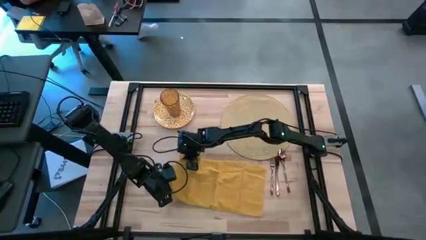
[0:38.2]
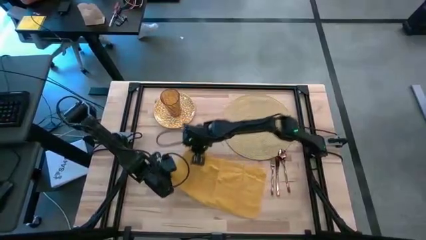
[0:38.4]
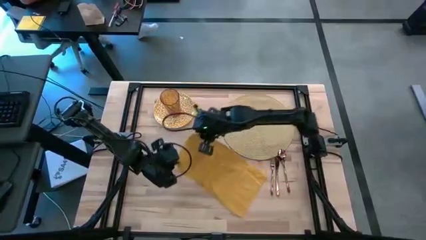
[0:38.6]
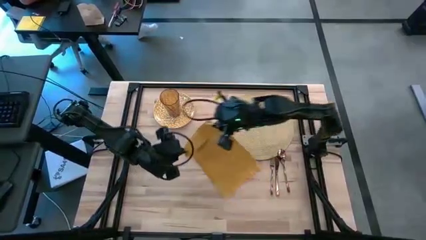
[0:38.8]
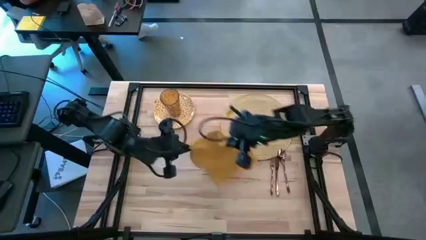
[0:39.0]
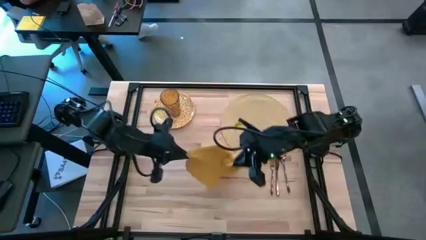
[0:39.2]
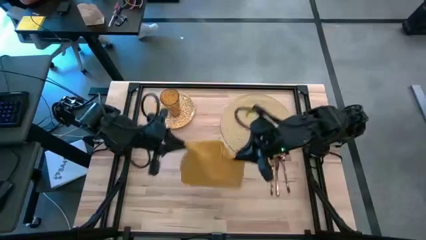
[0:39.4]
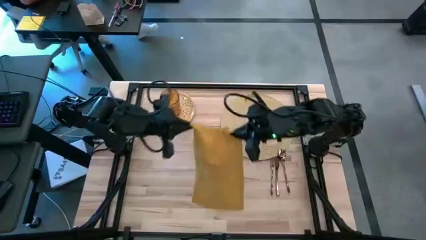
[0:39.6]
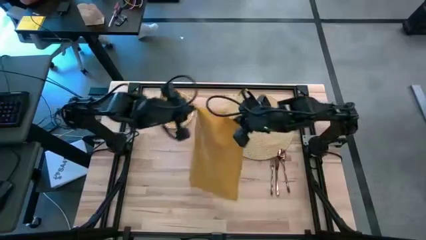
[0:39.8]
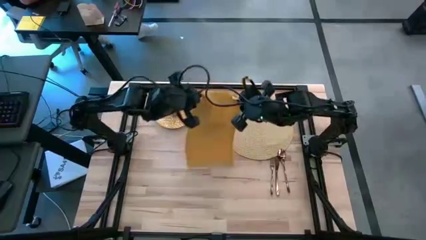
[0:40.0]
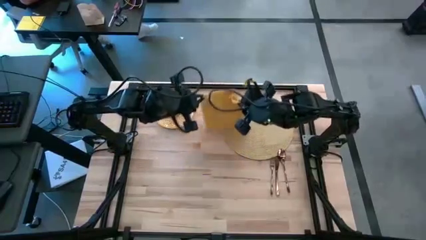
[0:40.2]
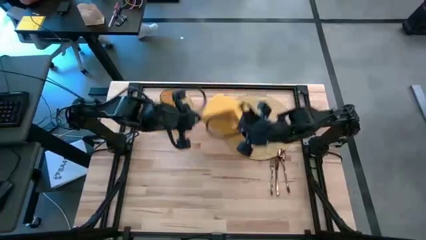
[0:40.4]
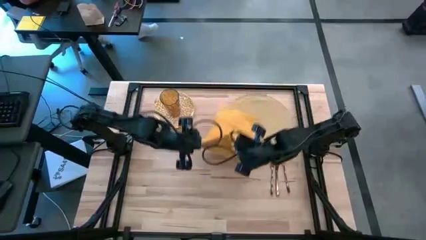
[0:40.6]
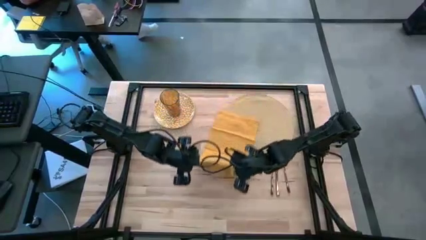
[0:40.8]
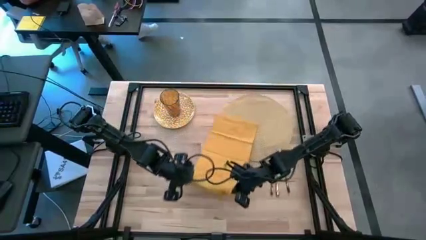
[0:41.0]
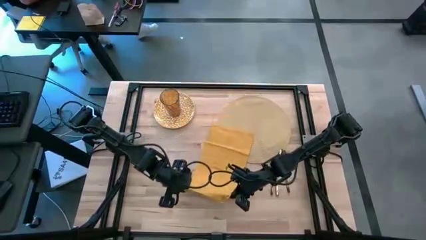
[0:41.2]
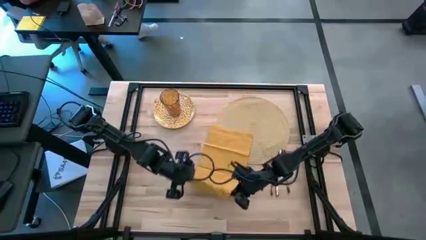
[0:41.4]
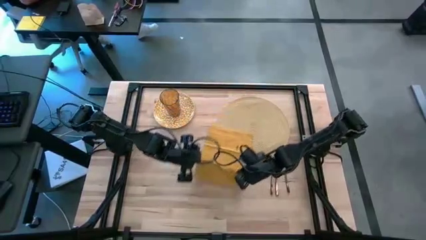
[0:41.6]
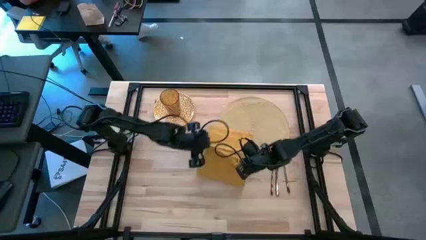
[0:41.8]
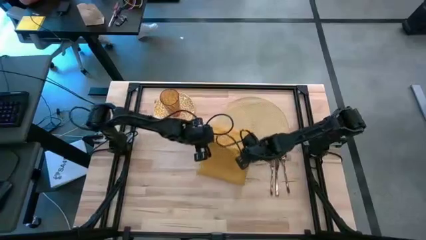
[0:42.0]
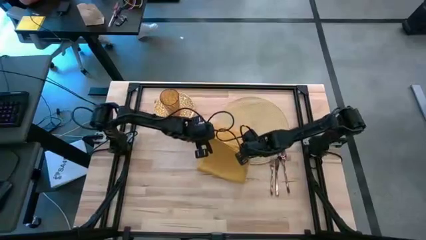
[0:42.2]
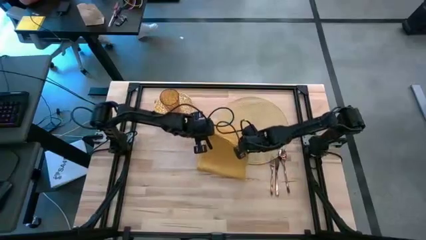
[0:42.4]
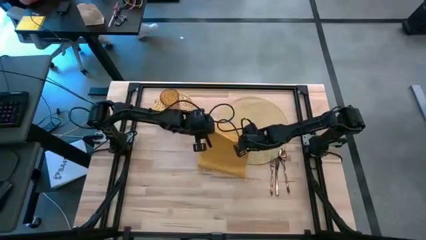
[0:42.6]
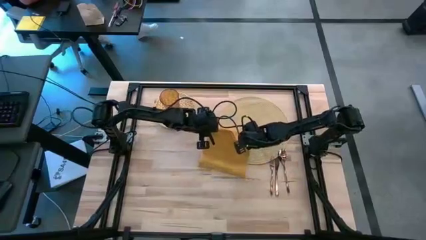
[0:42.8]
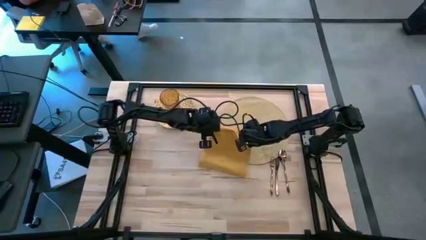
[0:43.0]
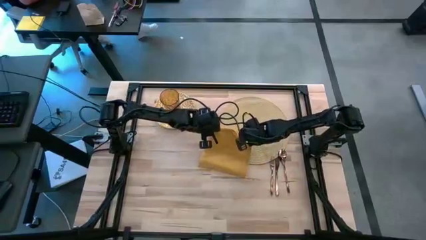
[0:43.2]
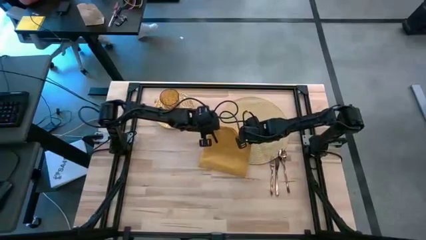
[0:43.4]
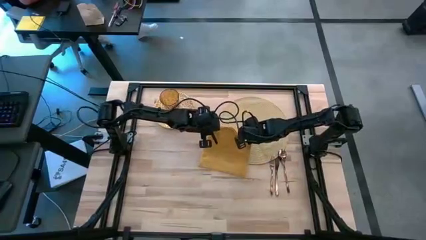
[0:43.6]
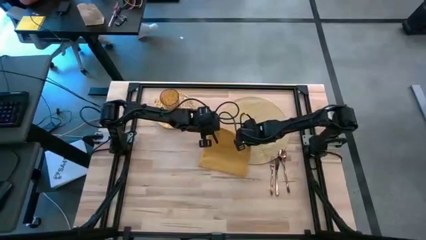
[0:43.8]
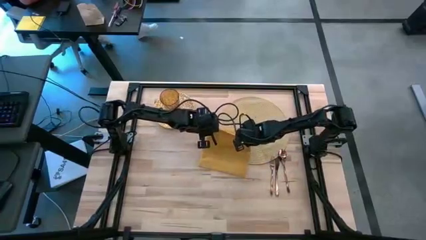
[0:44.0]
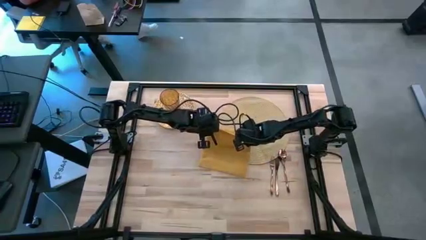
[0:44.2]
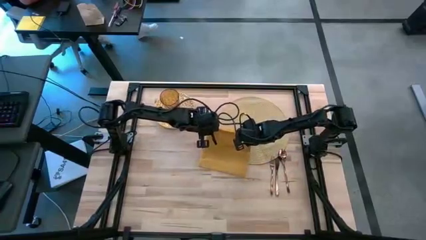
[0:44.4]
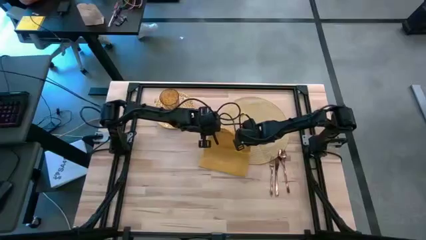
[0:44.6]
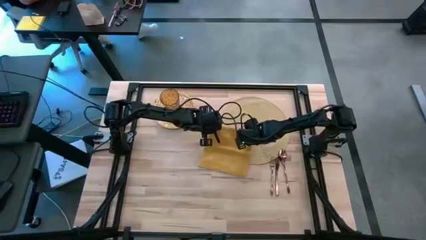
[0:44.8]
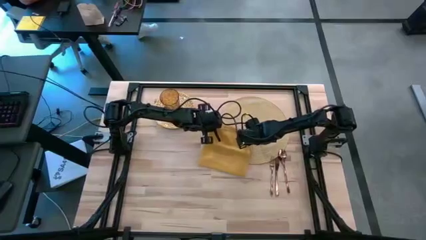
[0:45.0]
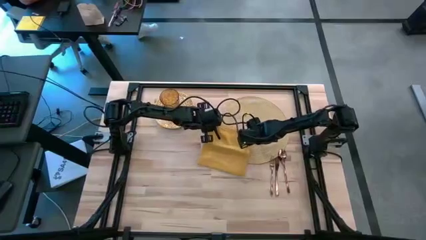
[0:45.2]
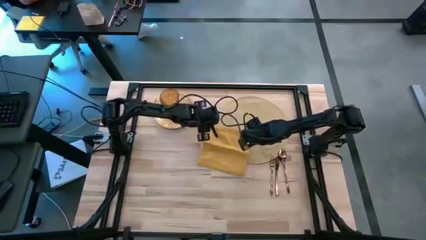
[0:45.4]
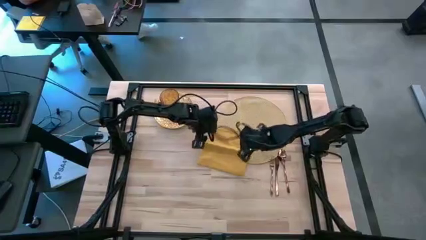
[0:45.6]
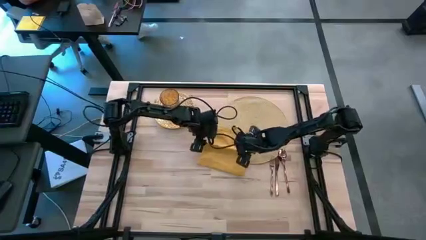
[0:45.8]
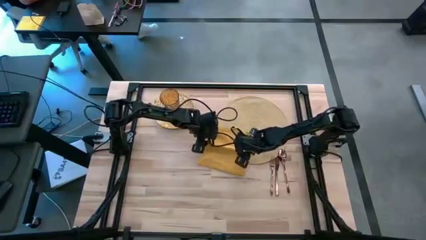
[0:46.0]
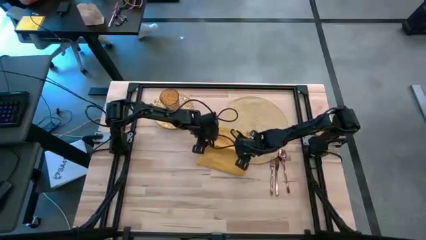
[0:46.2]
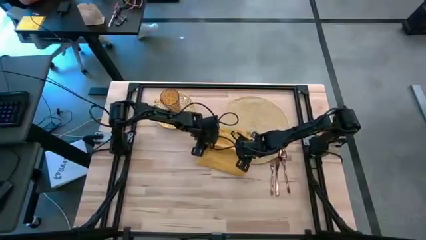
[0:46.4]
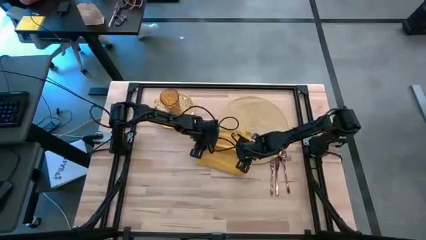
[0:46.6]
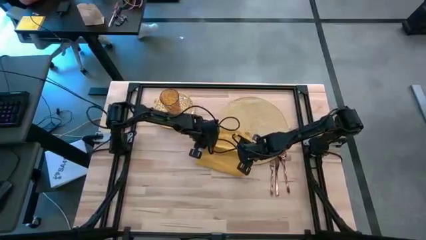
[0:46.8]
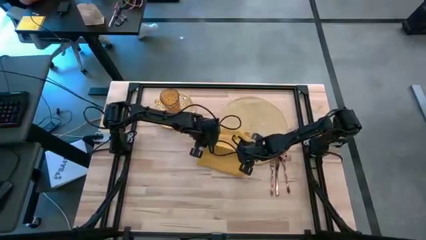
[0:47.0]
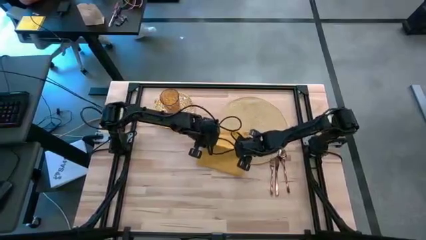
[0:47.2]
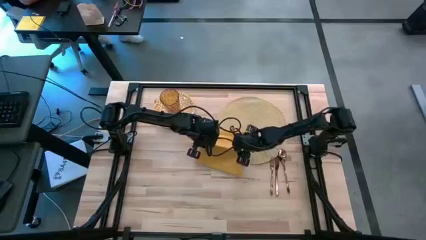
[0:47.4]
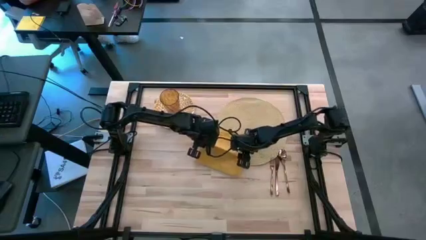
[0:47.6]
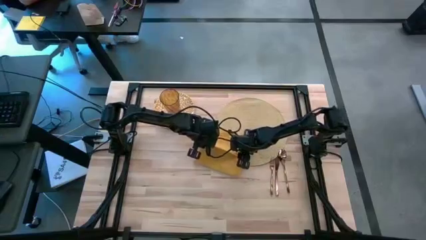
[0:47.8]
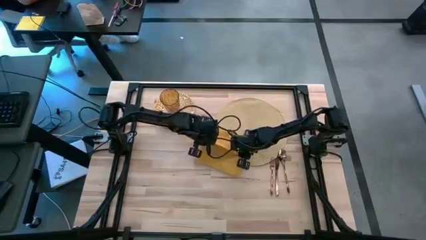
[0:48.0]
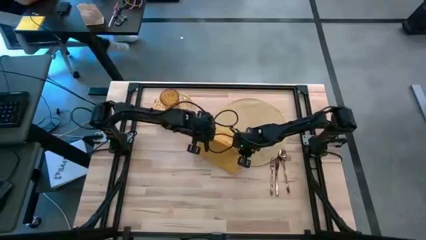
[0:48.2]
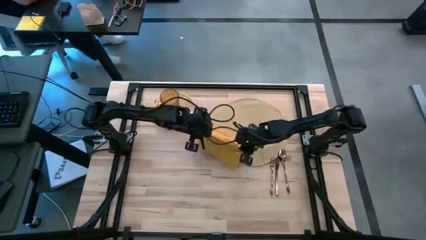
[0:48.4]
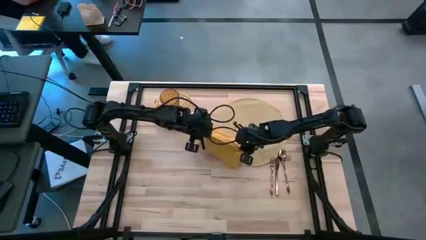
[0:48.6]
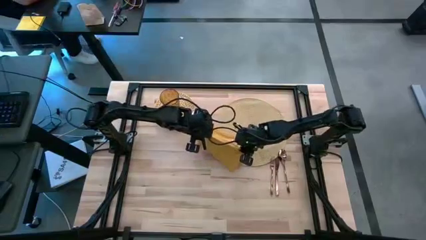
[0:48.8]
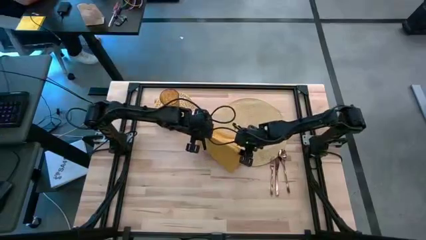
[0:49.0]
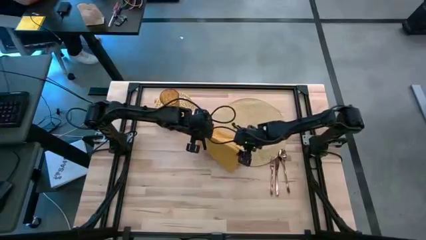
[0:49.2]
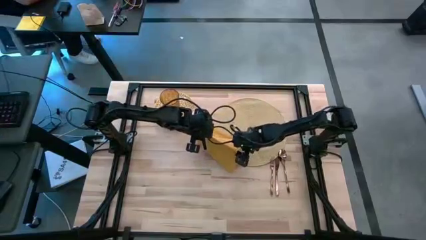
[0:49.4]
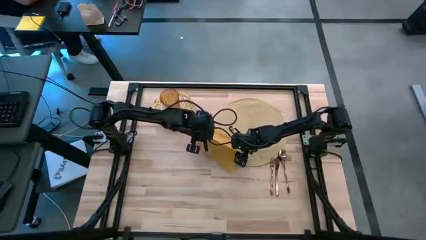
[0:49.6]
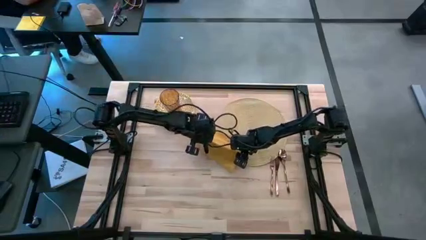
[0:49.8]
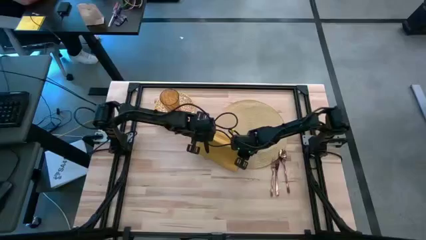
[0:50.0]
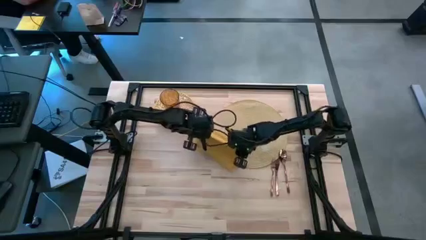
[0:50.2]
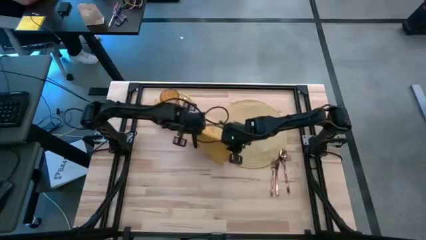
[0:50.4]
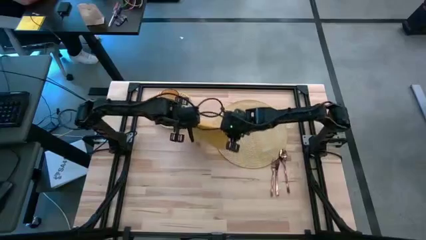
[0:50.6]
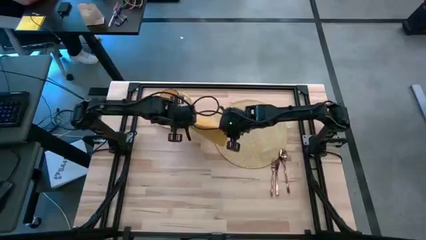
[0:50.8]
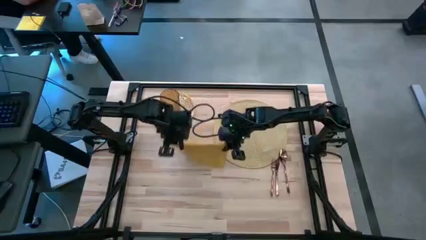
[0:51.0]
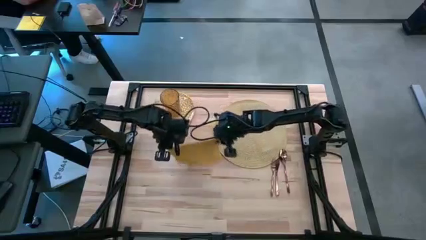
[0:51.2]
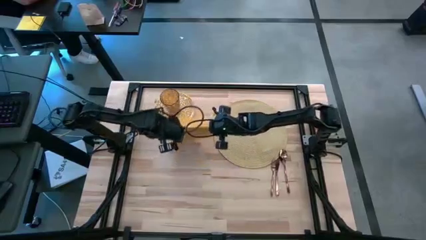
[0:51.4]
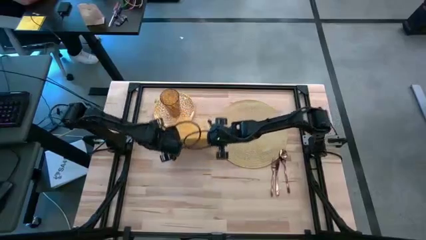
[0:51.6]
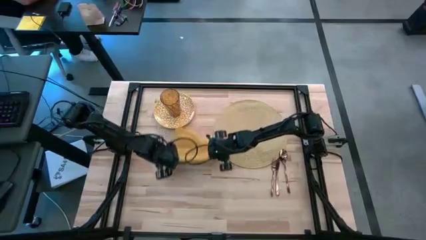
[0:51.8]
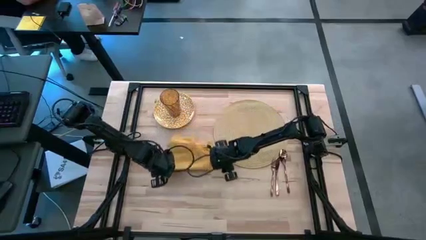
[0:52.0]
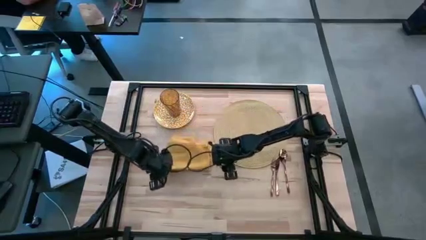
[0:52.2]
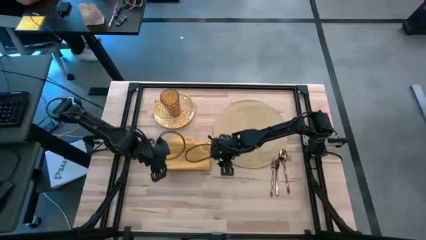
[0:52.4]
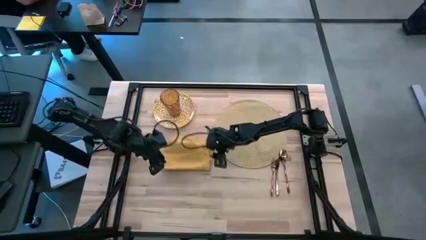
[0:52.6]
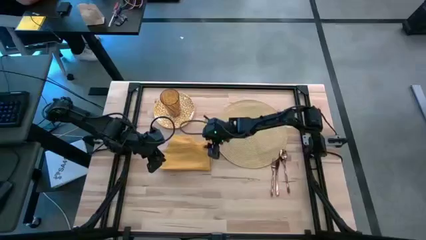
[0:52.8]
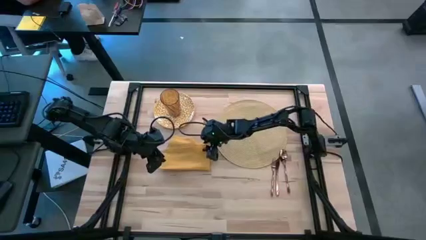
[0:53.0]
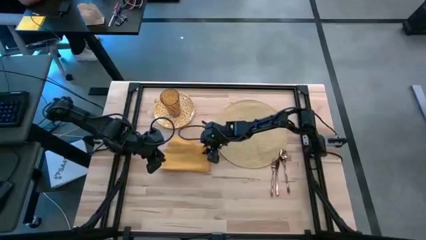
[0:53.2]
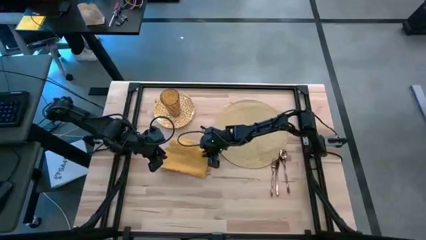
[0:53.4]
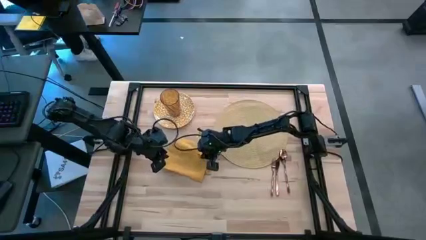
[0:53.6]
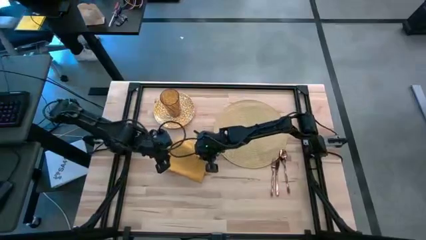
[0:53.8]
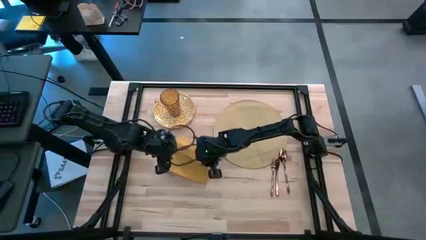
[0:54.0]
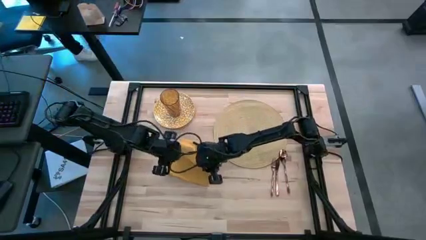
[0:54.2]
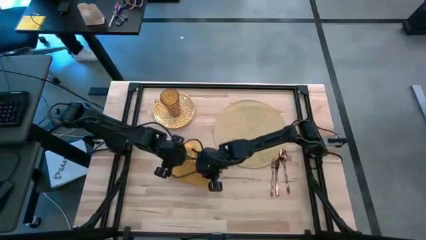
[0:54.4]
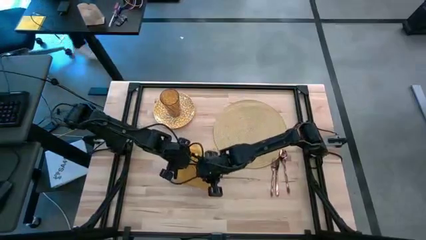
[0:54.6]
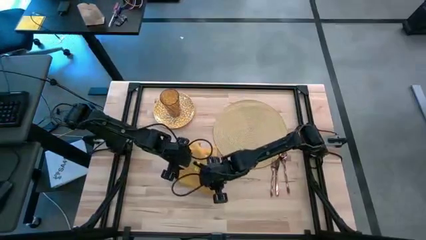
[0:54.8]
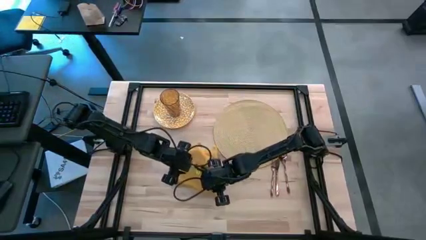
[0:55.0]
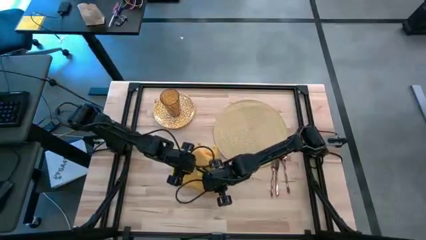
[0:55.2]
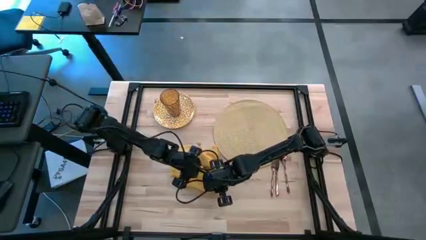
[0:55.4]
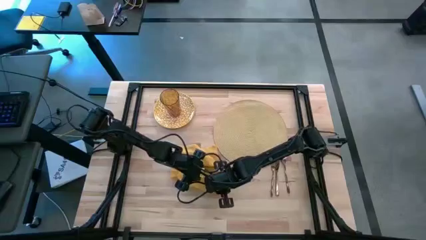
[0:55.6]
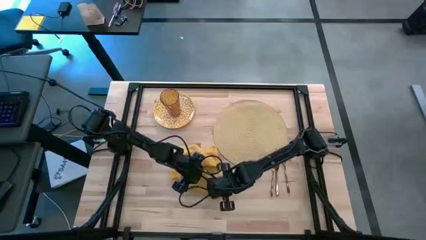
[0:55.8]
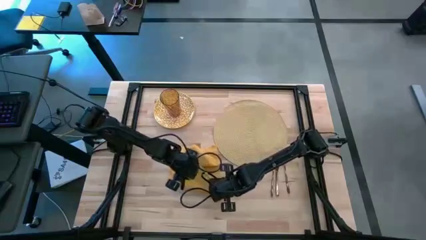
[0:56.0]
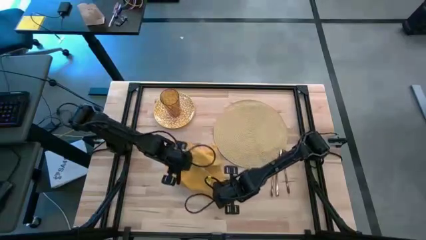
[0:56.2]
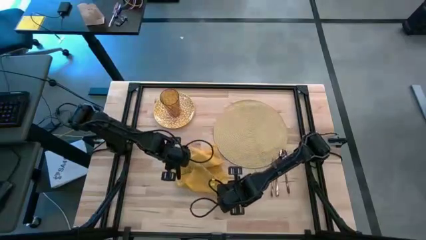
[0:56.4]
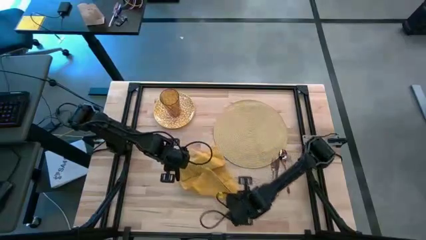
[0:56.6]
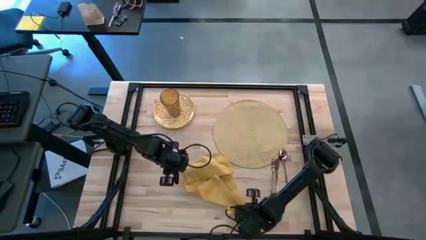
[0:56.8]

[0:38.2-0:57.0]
Task: Set table place
Fold the yellow table napkin
